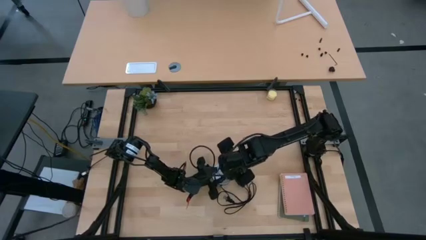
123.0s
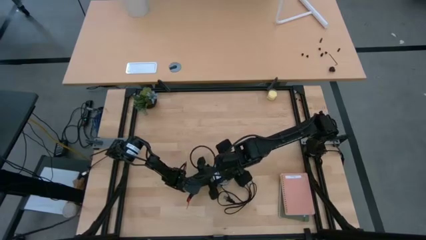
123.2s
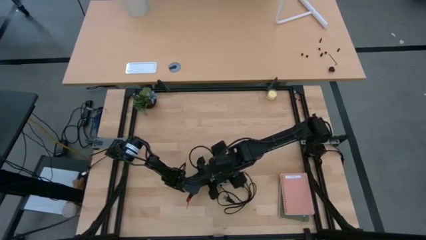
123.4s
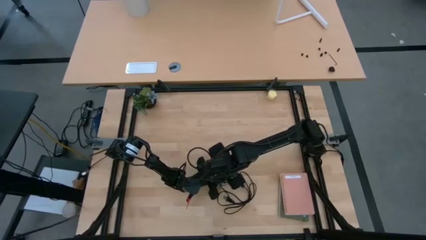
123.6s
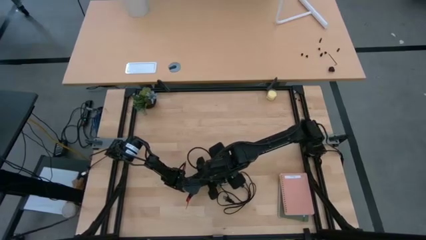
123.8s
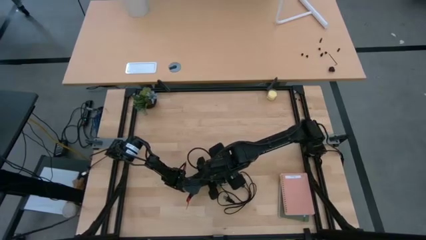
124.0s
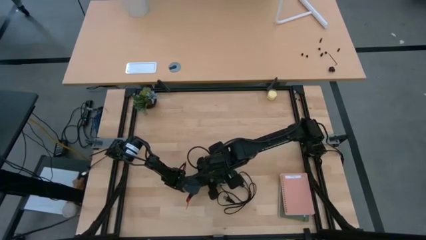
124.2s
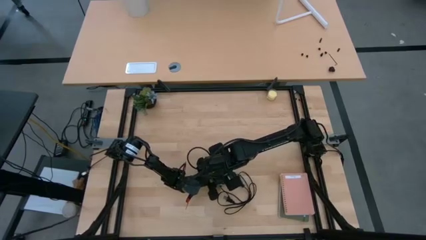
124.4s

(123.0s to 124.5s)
Task: Screw lightbulb
Insert the lightbulb into the lamp

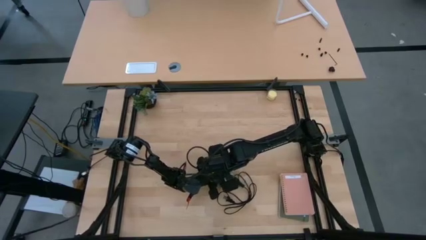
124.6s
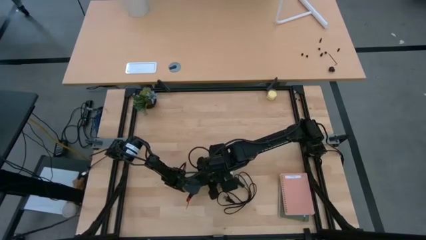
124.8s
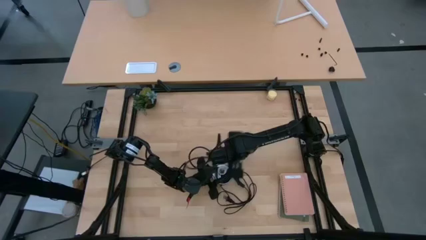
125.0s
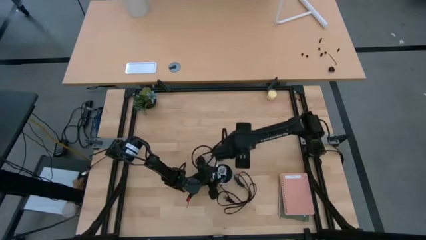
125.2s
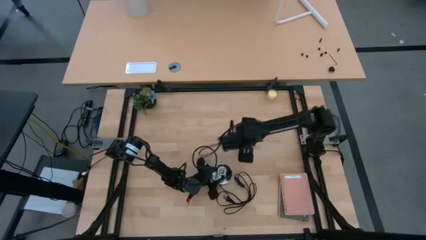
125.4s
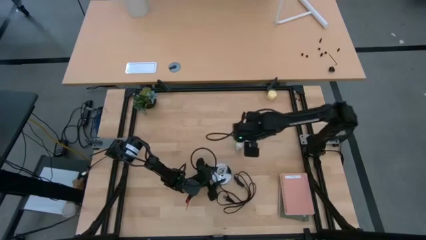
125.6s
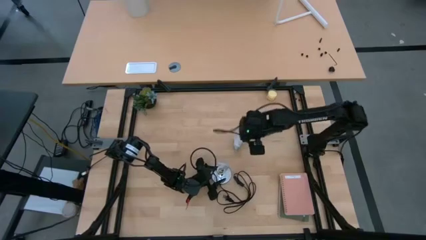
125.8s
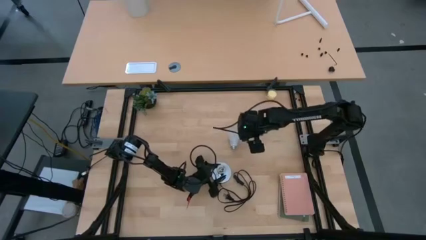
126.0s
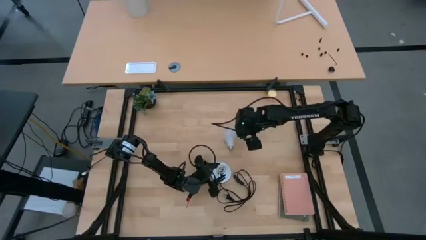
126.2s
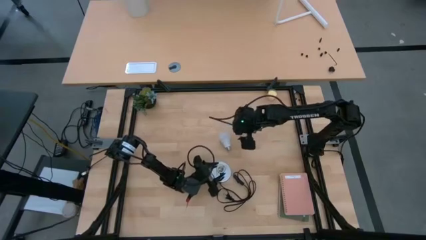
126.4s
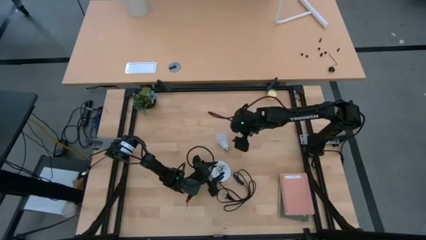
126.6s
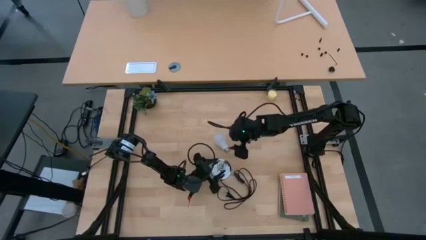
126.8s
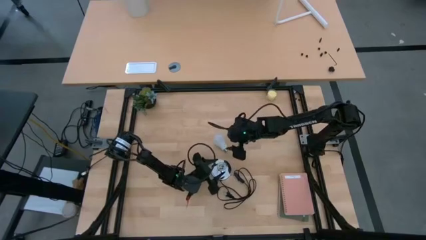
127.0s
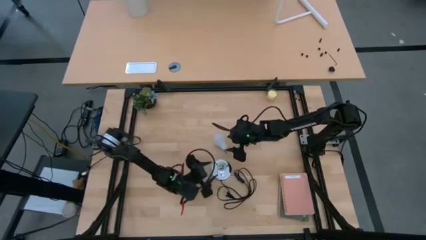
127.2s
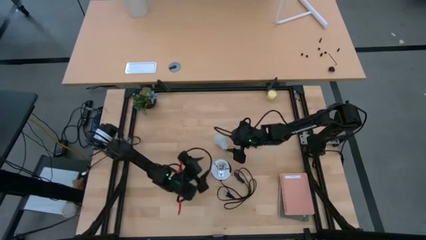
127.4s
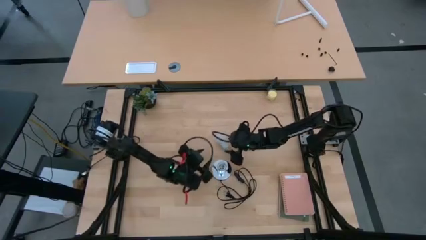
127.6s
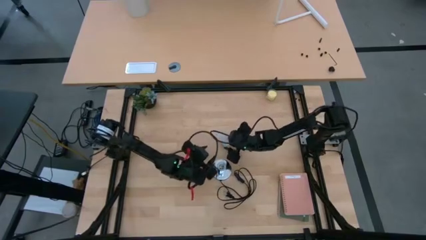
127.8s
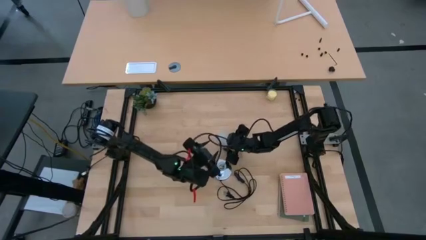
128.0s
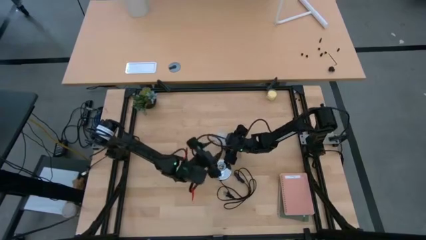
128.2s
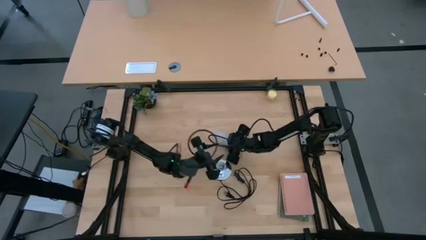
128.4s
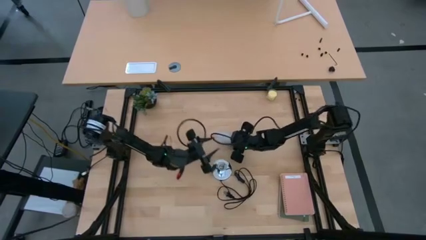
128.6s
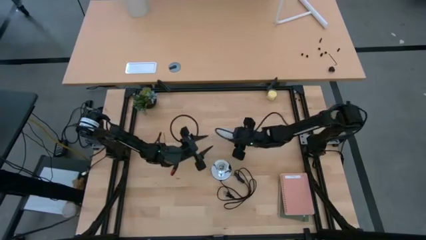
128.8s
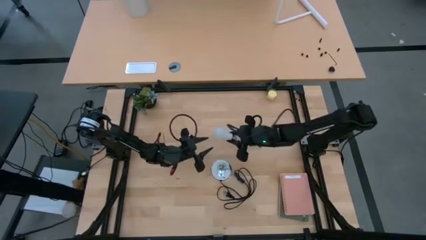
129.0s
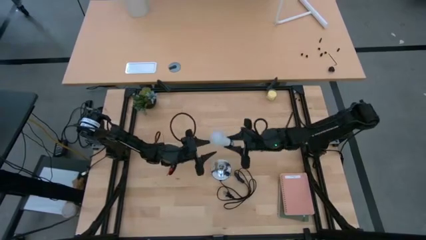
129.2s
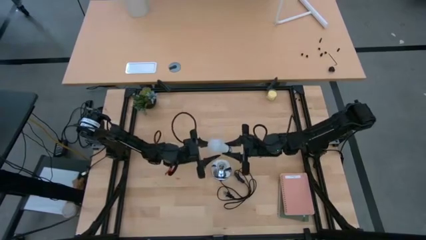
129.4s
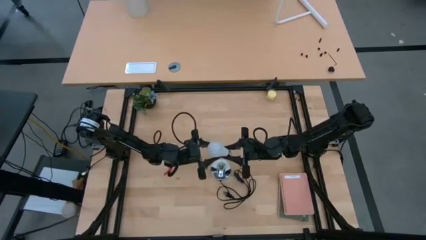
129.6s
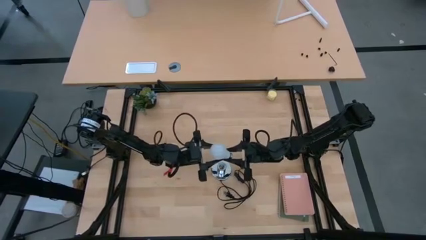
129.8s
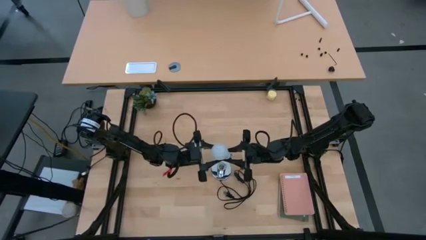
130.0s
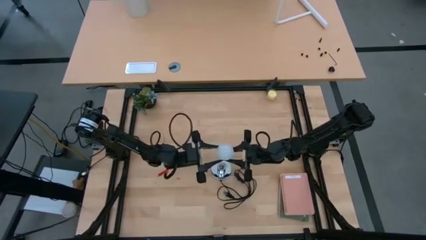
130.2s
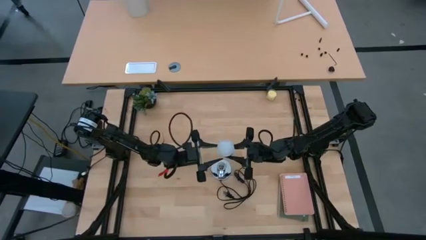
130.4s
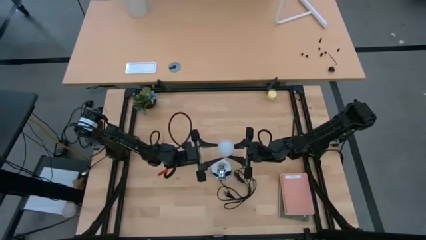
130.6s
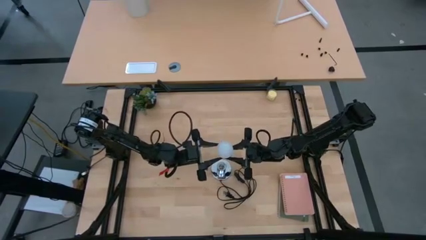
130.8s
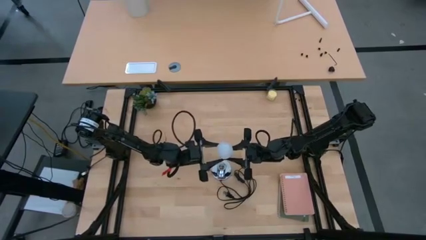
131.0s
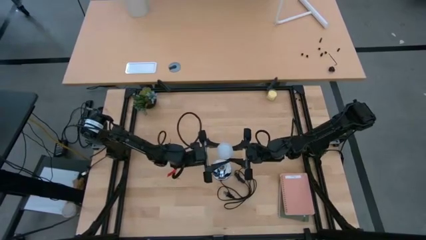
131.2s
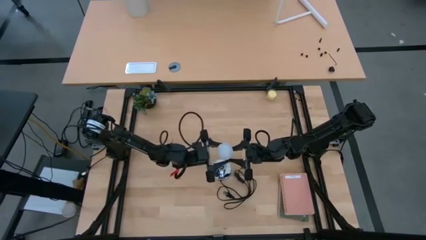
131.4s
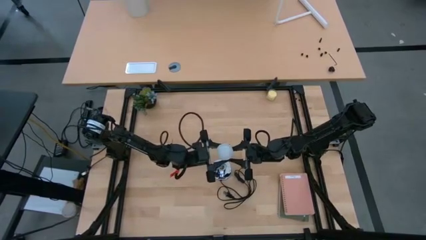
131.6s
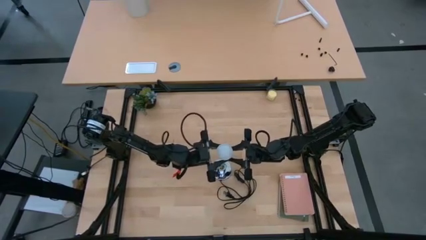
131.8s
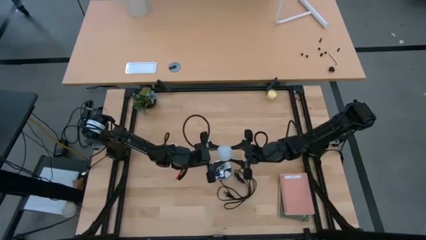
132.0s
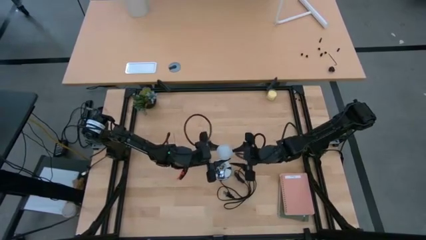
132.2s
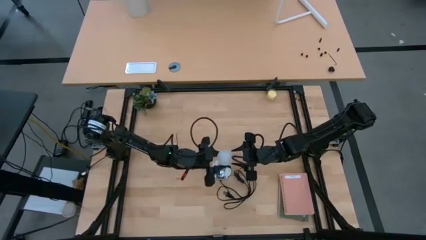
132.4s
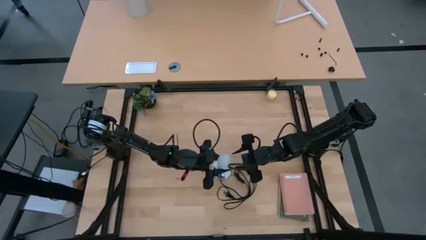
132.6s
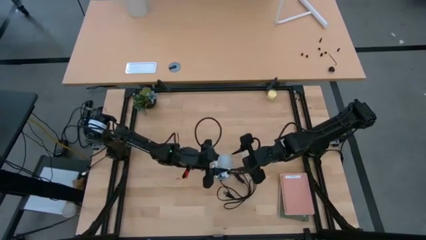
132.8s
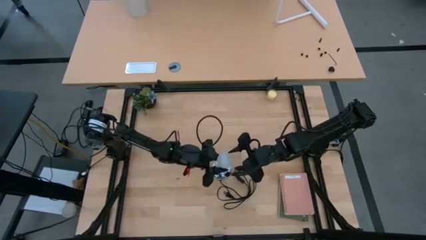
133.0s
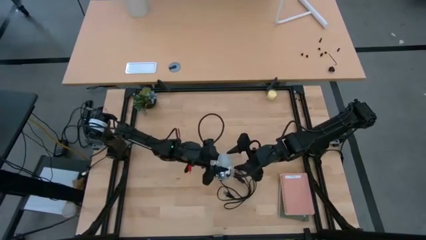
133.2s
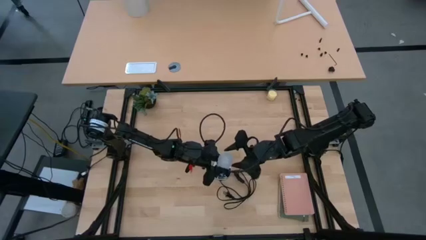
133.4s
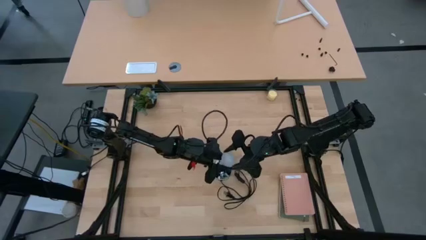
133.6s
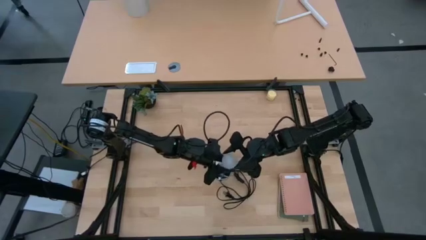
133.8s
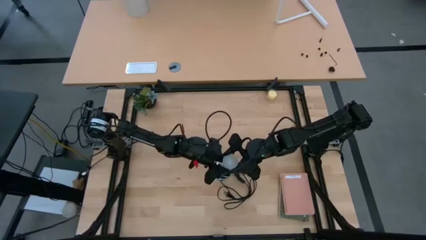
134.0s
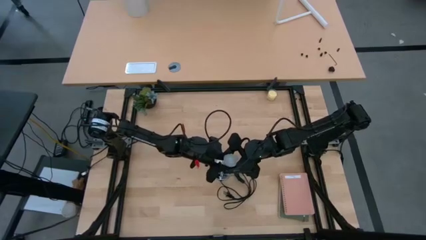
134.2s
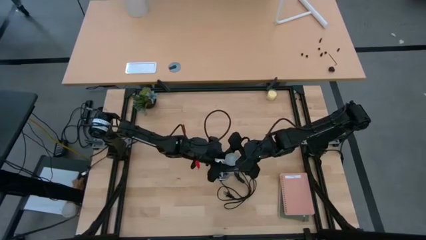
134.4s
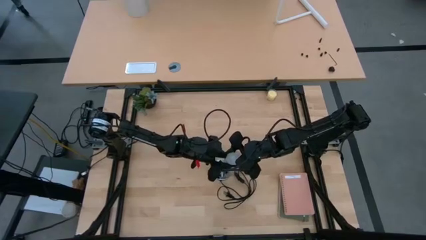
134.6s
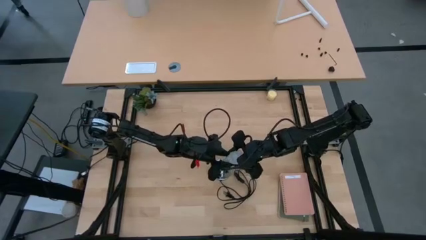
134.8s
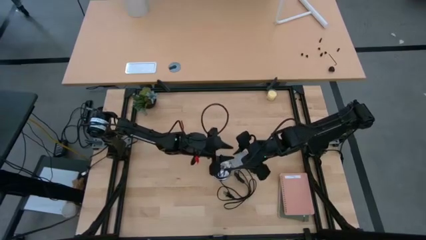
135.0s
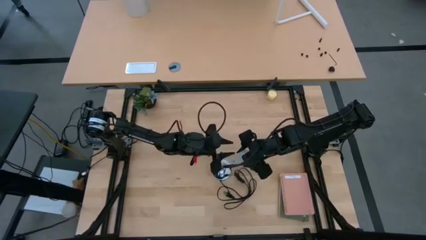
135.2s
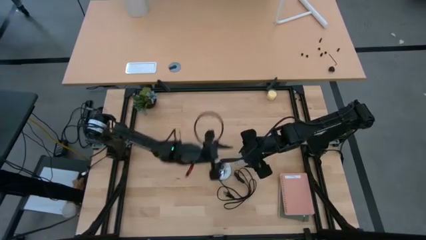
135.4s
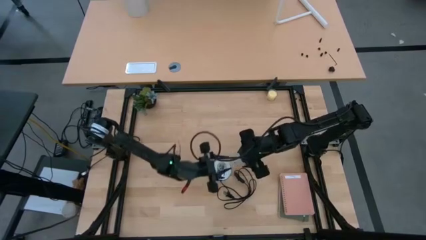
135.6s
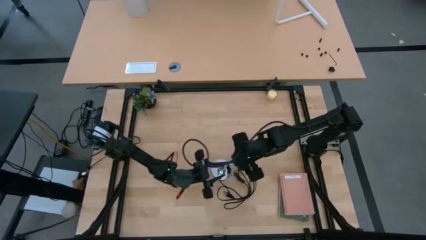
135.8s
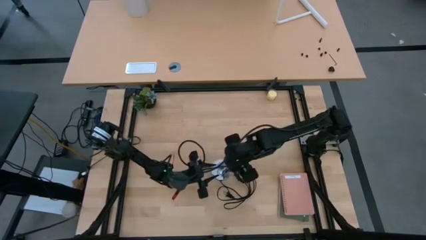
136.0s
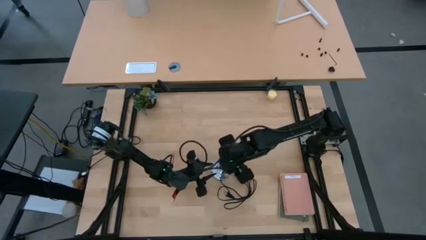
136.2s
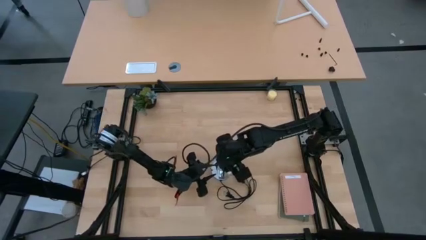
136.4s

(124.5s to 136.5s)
Insert the lightbulb into the lamp
